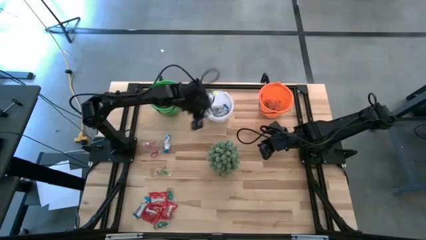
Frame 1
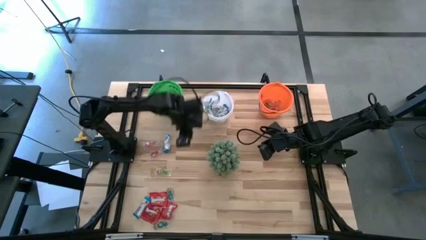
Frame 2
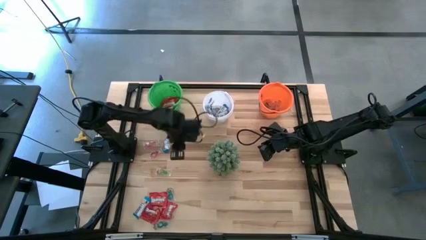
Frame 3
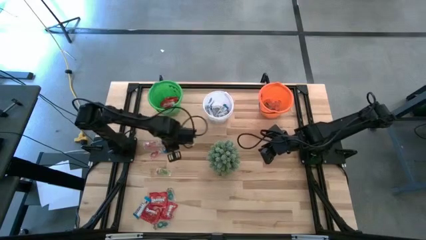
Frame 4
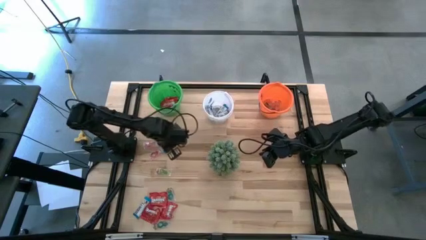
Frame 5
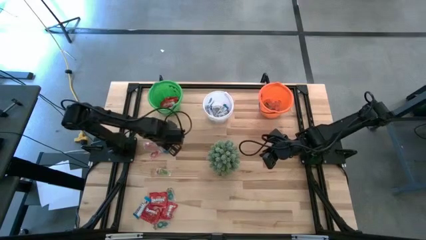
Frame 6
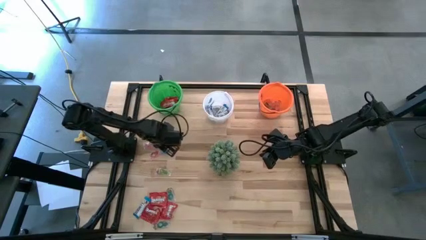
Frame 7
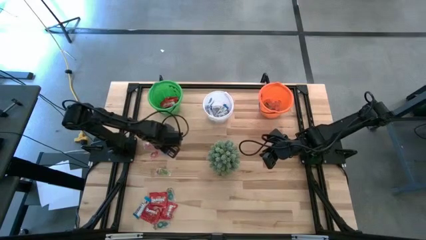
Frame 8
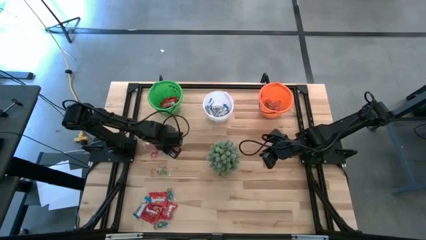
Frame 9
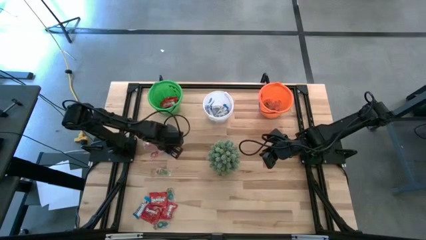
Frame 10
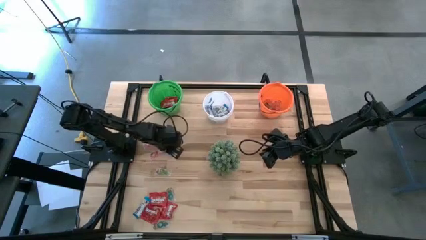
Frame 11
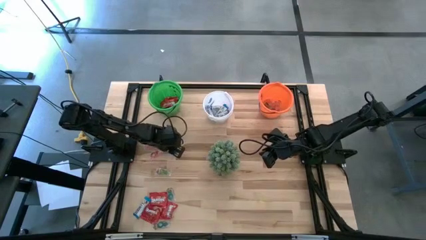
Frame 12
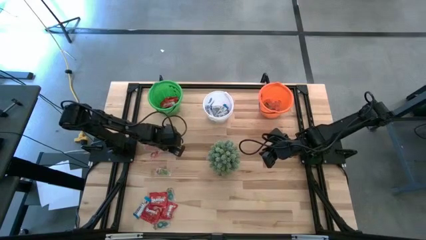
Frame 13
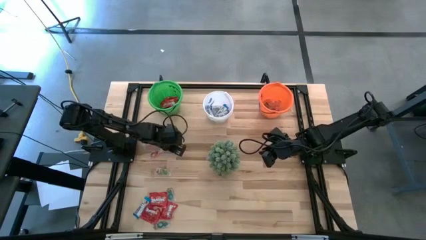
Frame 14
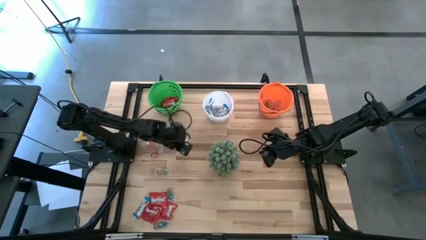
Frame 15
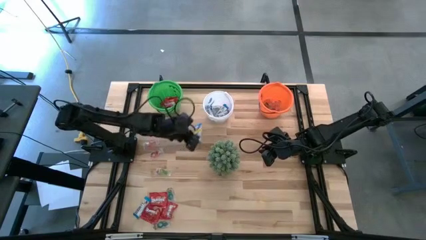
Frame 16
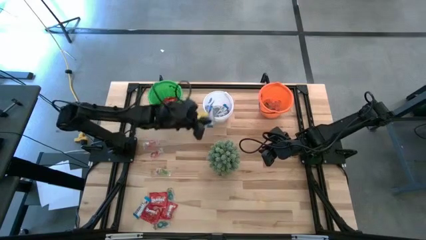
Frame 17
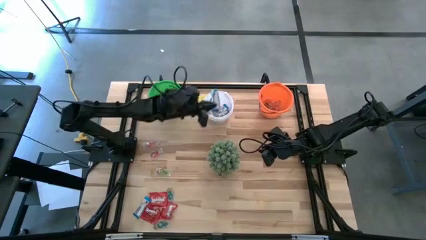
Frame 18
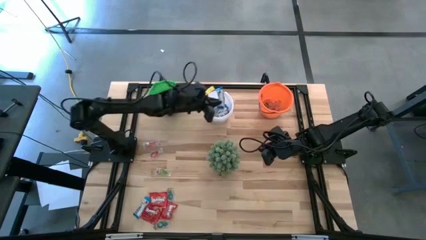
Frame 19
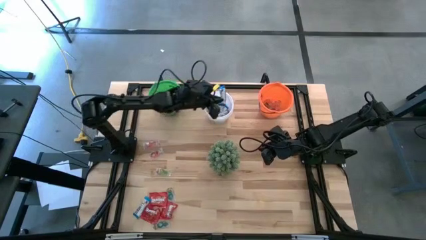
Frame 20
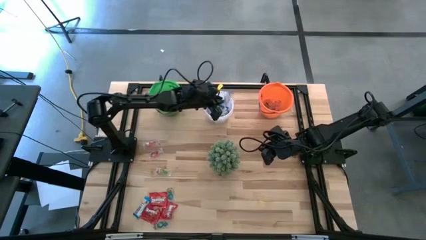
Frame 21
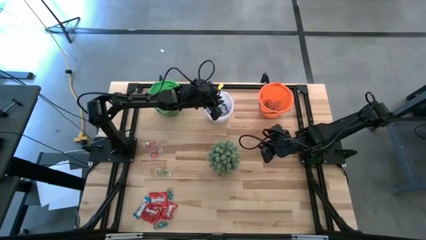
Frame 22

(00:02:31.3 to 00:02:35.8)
Task: Sort candy
Put the white chocolate bars into the white bucket

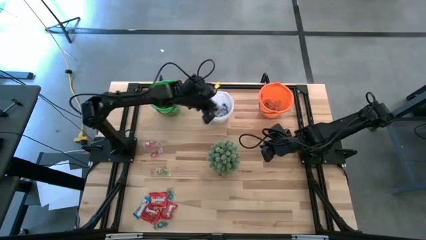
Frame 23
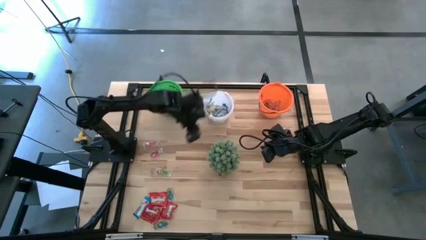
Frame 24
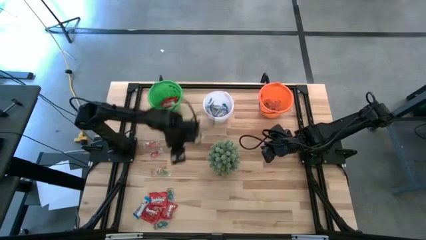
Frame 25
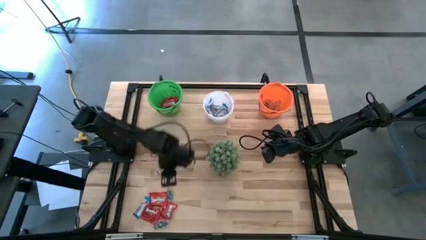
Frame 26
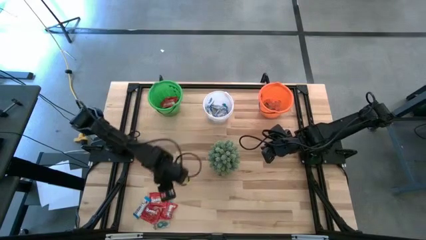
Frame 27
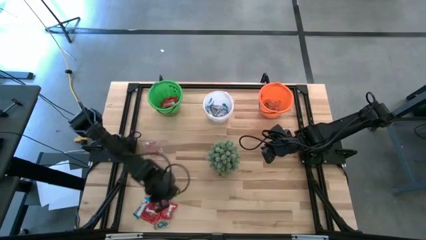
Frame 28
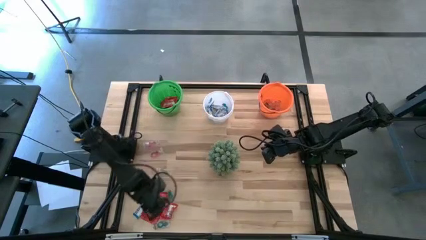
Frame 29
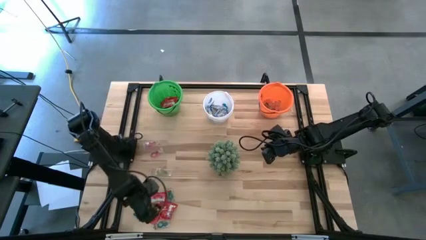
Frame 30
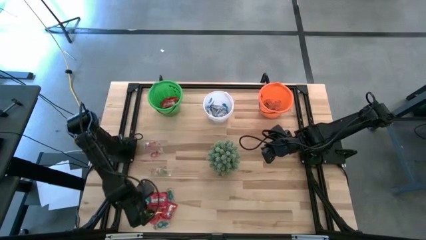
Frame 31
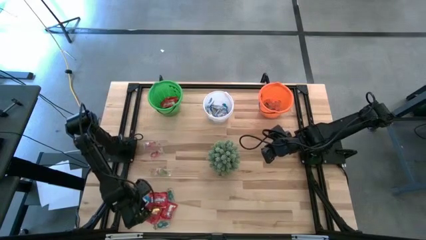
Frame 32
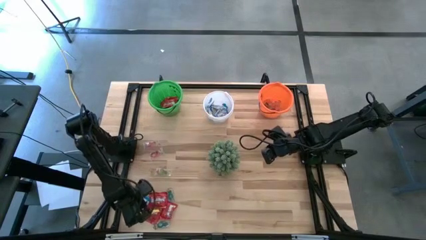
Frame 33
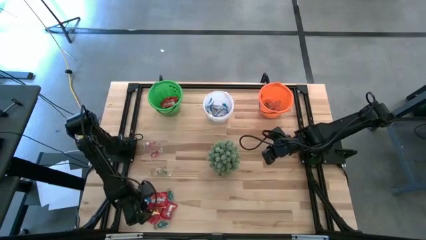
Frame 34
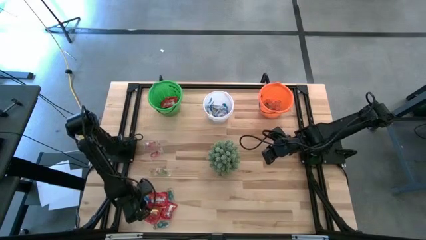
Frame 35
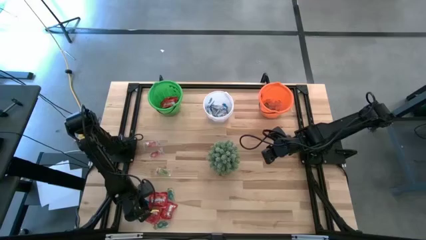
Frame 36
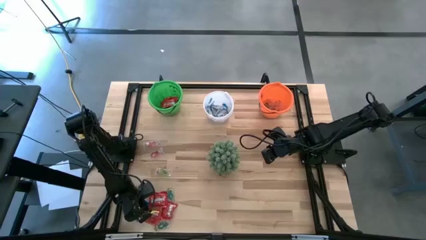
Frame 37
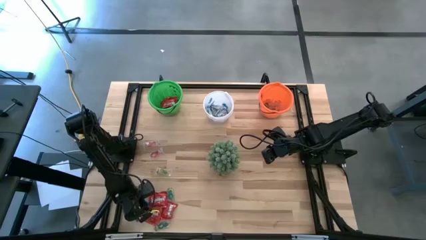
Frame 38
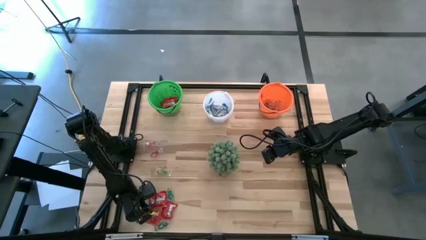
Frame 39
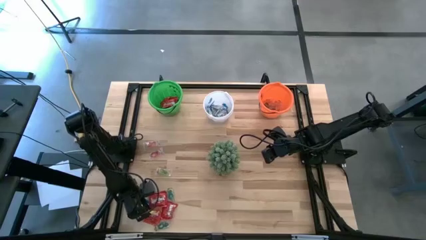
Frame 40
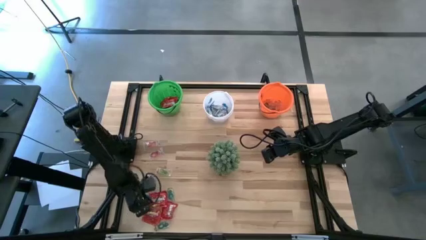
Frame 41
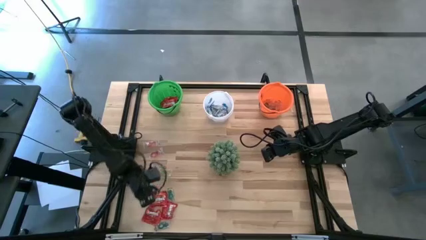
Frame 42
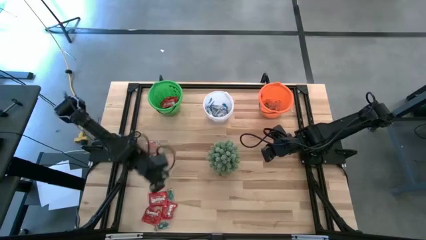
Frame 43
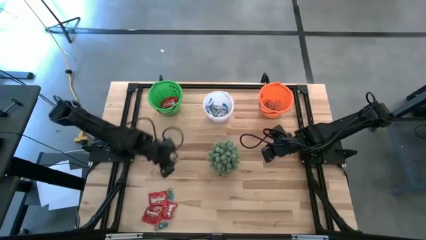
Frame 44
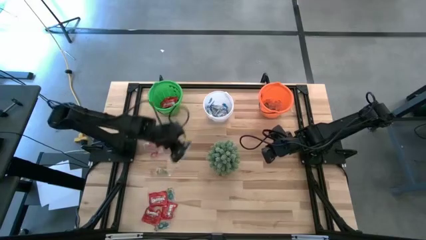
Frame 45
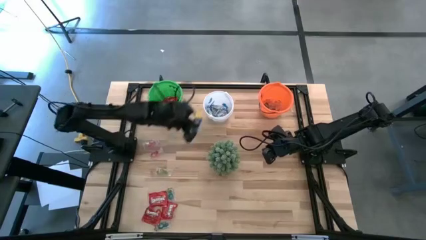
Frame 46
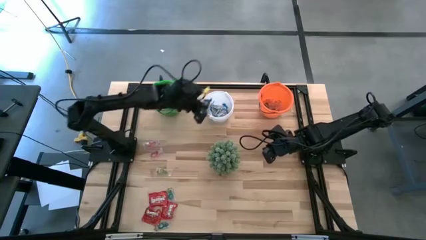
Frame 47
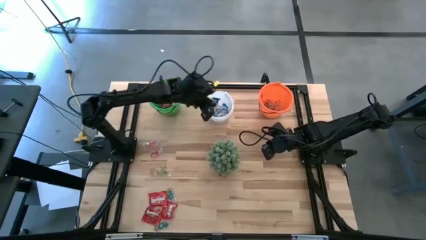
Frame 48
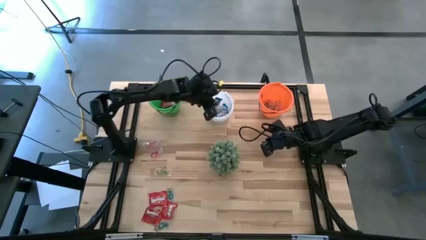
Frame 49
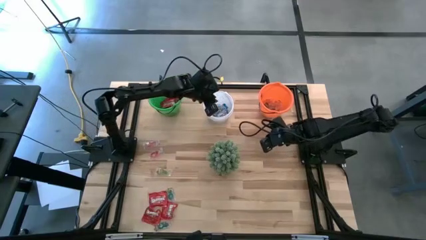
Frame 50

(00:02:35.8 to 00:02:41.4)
Put the white chocolate bars into the white bucket

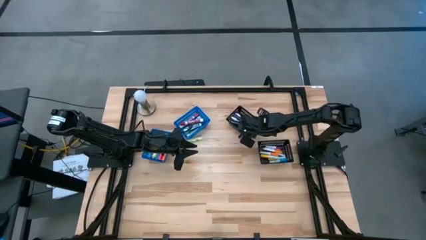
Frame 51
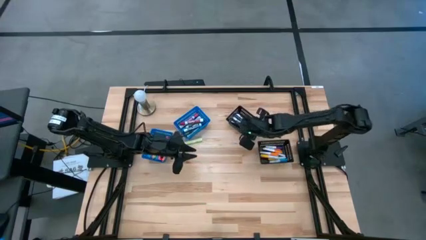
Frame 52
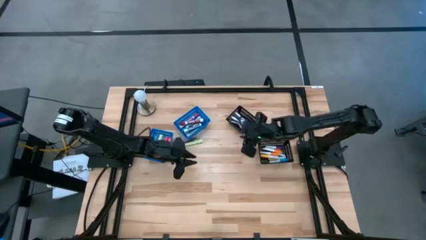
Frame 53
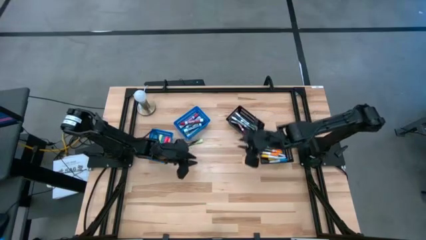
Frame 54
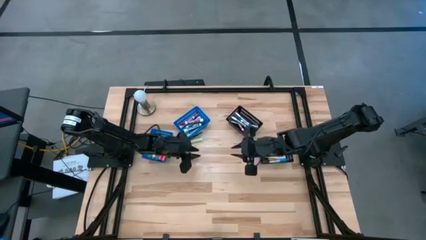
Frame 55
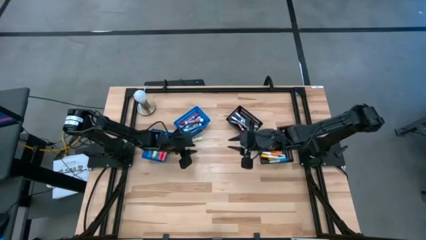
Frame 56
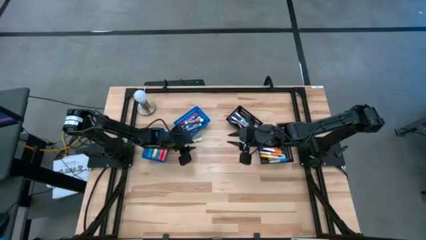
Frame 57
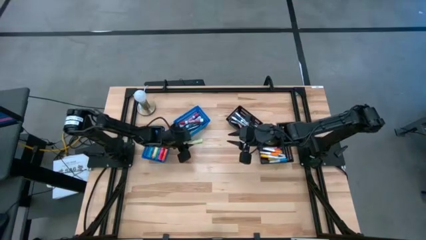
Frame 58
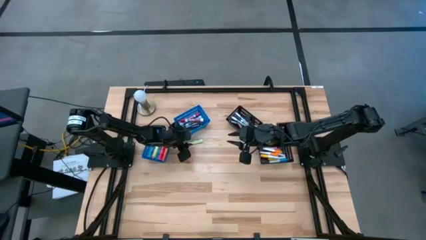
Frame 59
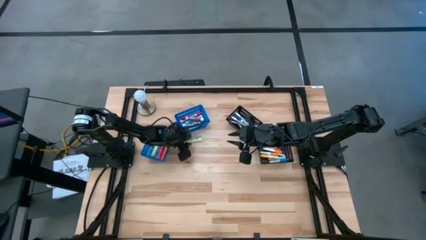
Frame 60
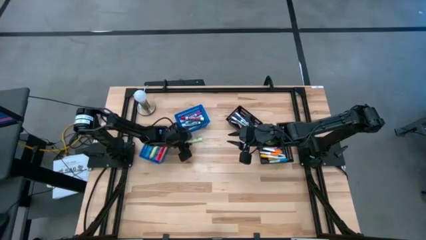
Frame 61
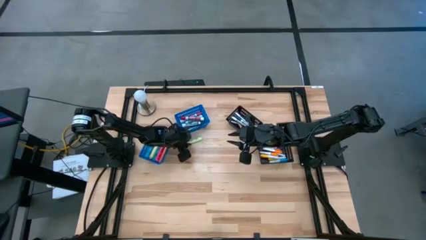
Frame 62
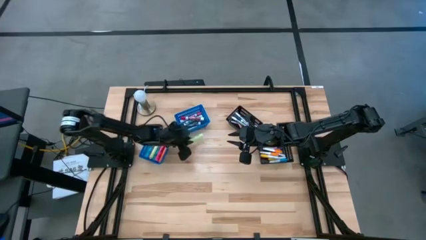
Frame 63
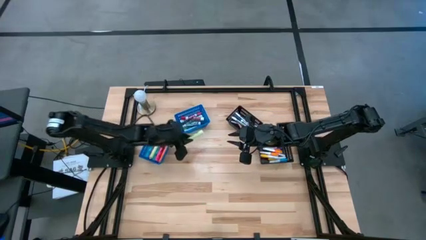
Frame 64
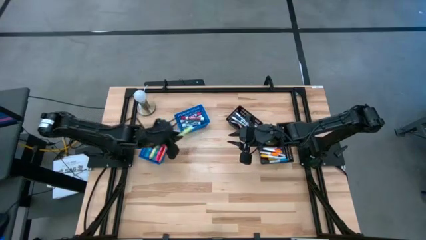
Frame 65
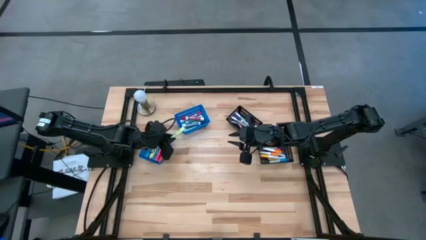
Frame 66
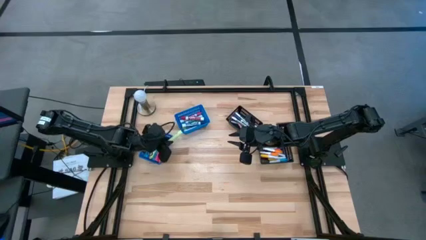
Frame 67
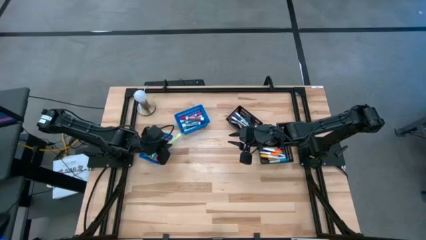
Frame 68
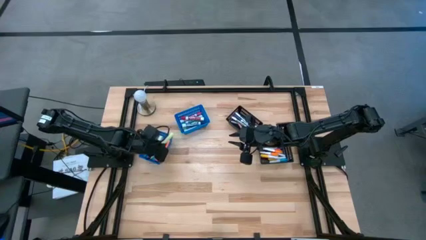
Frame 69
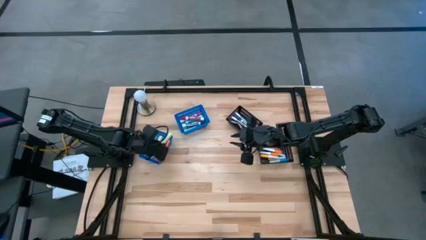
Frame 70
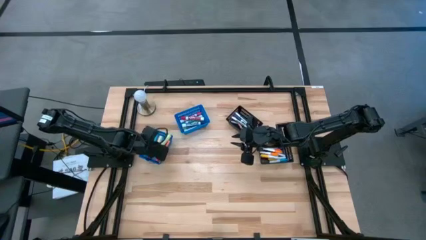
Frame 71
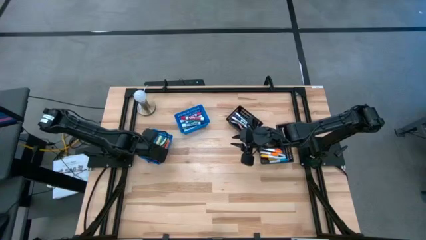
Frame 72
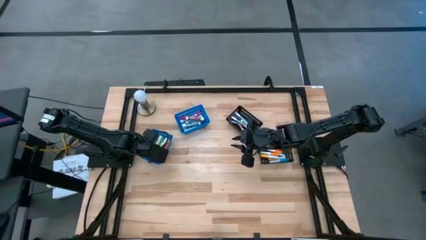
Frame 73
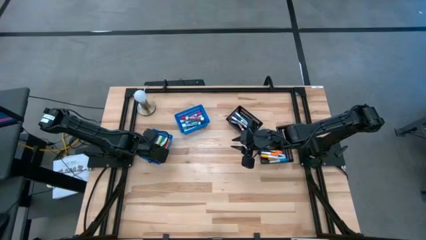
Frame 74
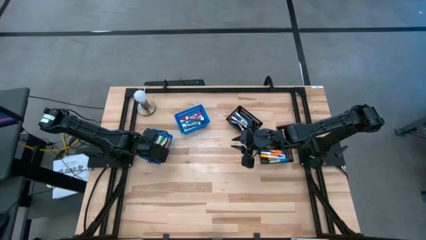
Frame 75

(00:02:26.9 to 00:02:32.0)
Task: Pick & Place Markers
Put the light green highlighter pen into the left blue bin
